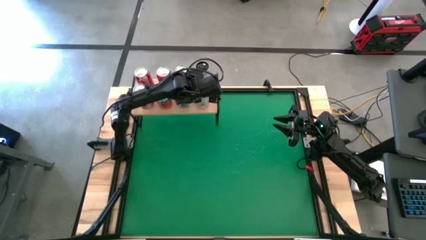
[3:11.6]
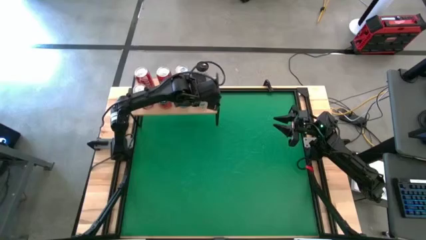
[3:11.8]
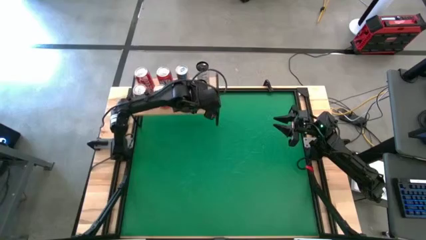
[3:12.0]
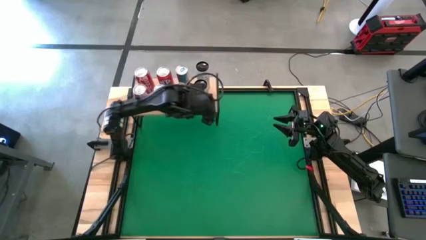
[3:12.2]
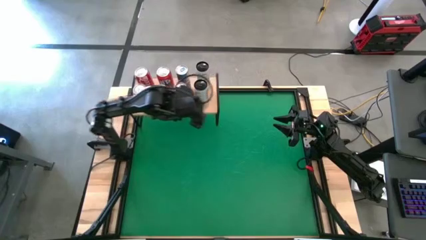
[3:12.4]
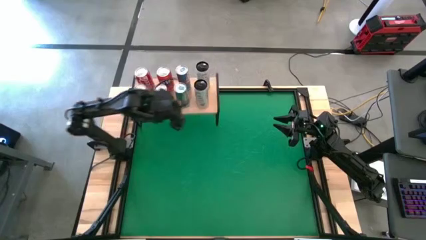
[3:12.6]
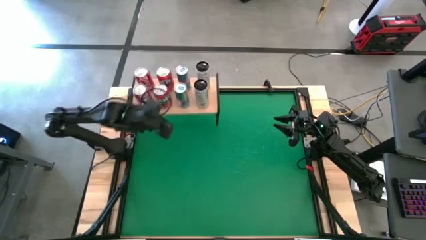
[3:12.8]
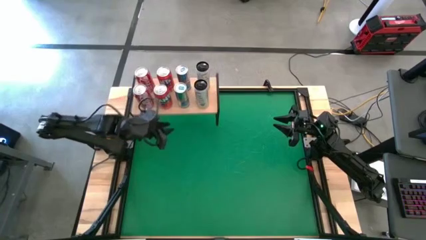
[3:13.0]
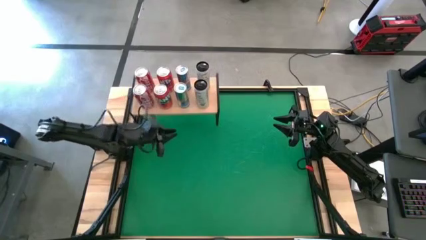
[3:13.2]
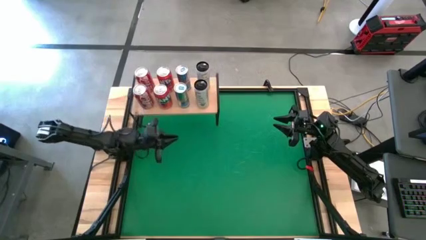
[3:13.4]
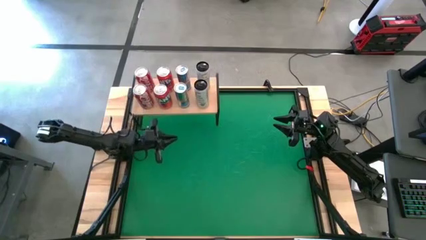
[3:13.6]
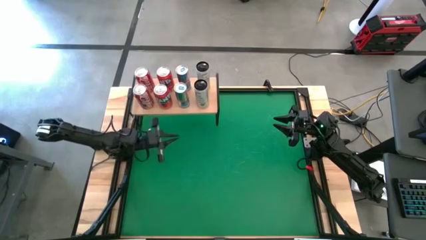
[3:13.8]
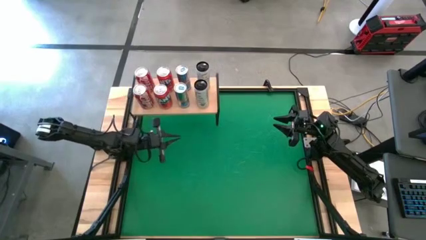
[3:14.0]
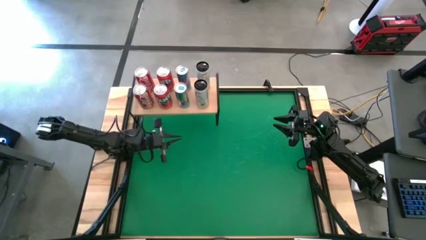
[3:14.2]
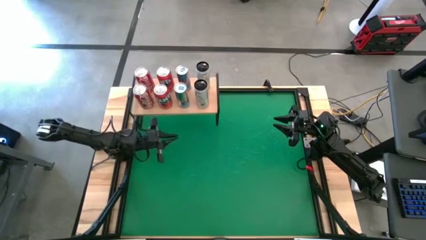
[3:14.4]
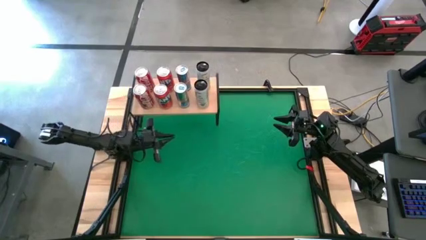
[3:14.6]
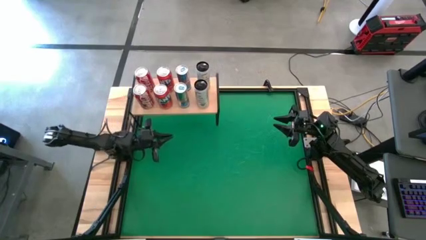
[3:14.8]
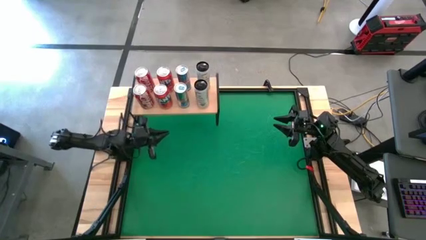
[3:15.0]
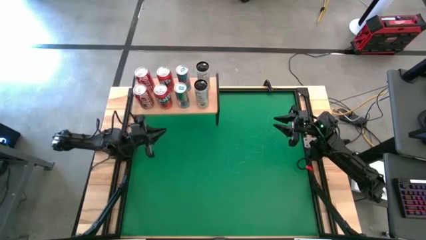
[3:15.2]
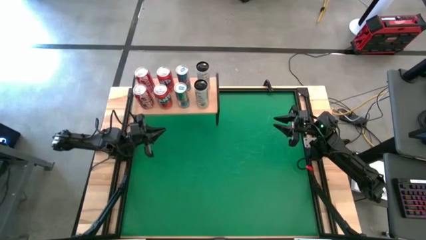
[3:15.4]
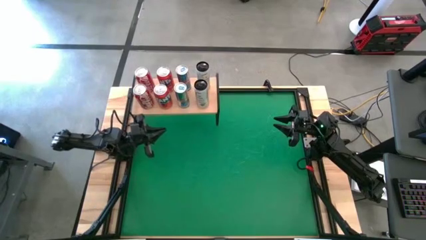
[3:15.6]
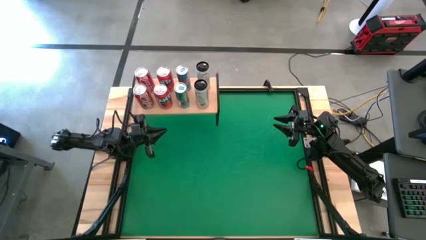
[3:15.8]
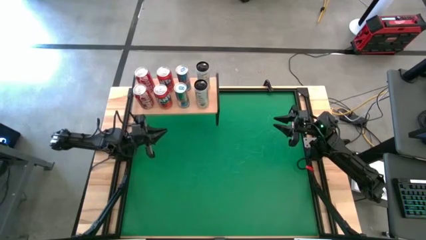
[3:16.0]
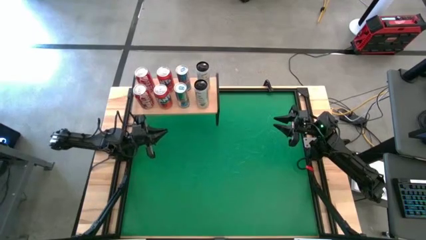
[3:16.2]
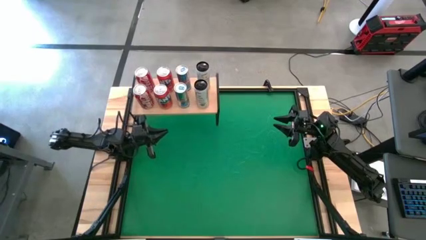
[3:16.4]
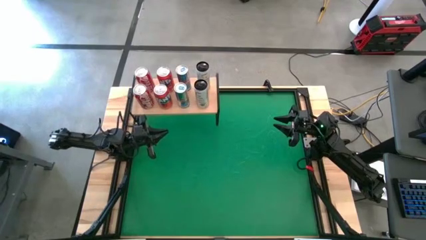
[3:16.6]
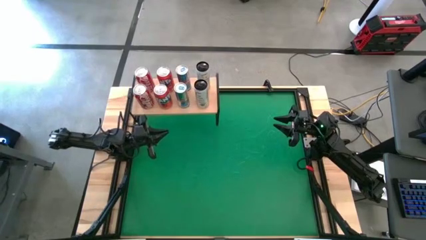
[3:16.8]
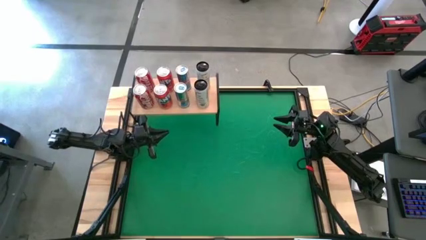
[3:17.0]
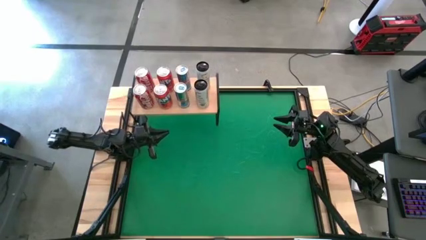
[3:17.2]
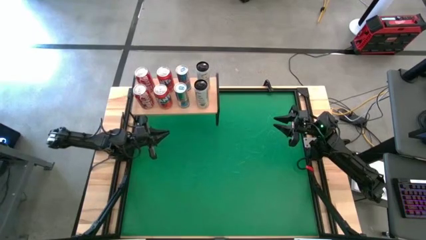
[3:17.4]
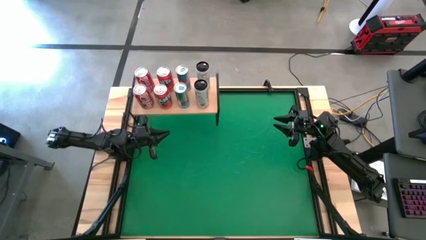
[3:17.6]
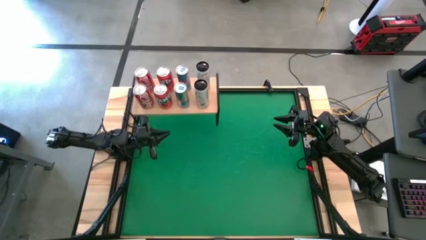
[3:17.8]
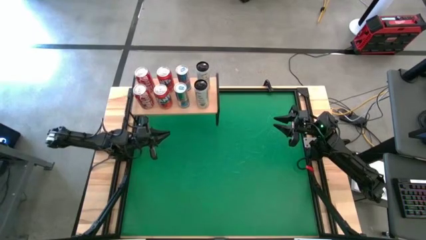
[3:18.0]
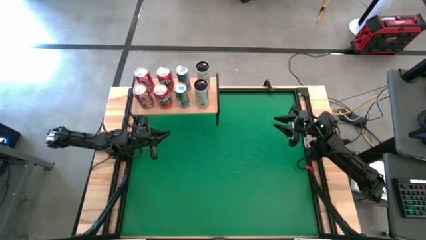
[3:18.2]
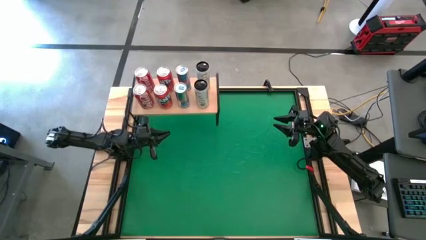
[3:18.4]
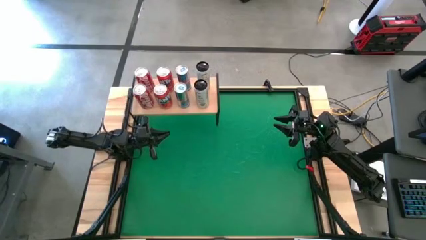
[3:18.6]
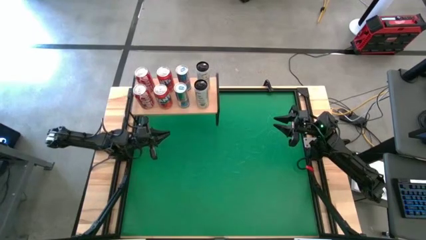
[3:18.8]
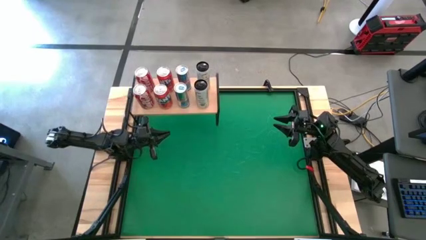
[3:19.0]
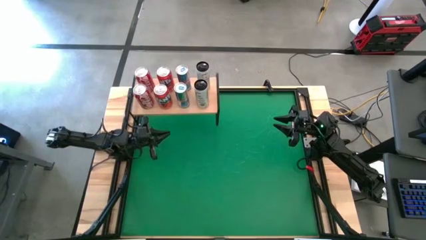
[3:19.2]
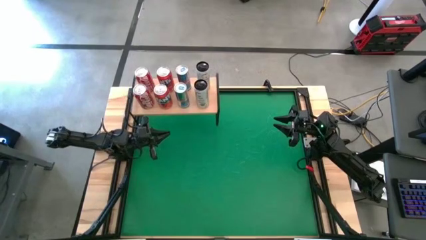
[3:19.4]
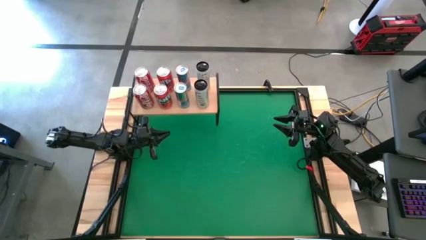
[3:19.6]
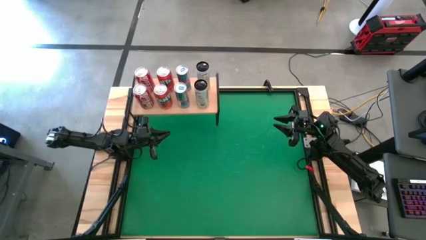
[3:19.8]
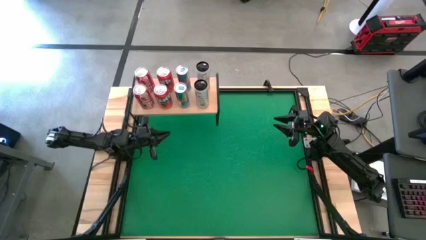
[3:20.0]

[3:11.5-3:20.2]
Task: Place canned beverage on shelf
Return to Home Position

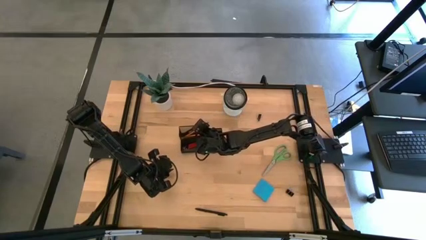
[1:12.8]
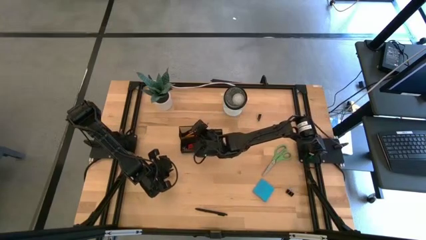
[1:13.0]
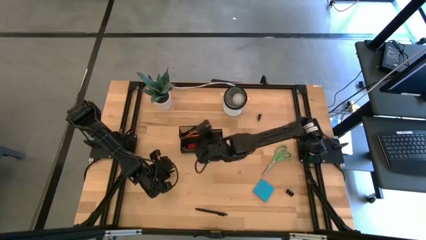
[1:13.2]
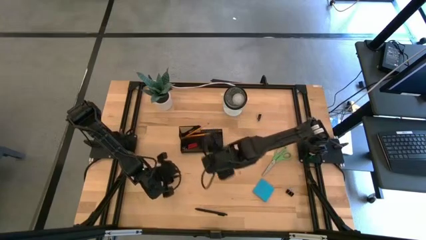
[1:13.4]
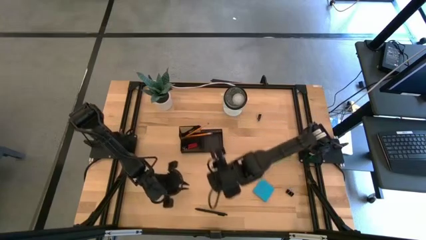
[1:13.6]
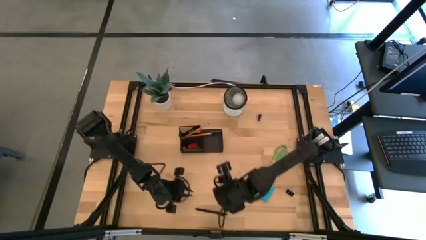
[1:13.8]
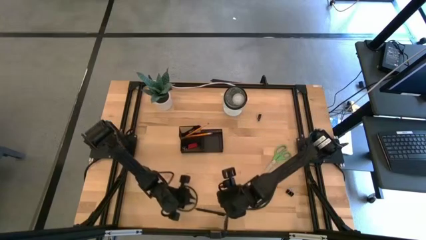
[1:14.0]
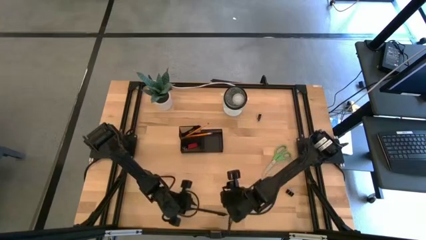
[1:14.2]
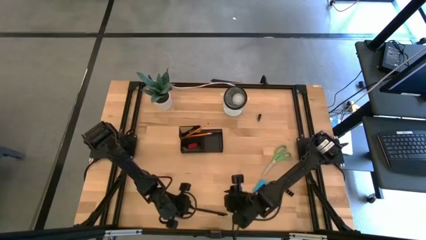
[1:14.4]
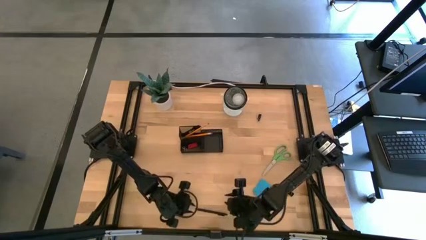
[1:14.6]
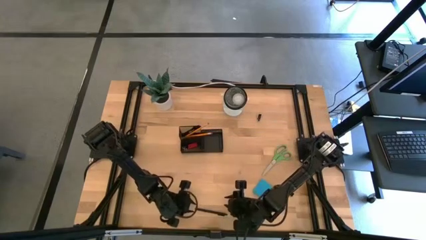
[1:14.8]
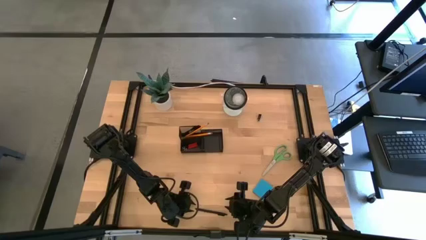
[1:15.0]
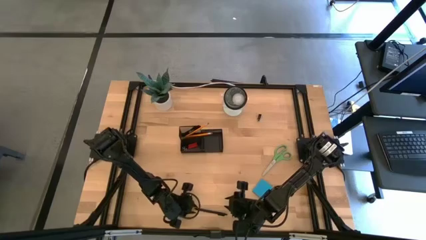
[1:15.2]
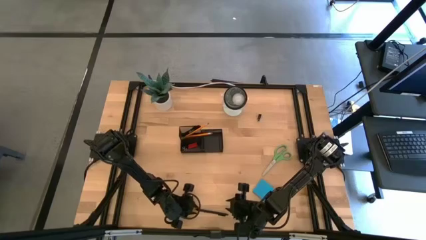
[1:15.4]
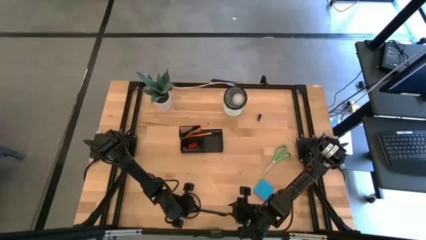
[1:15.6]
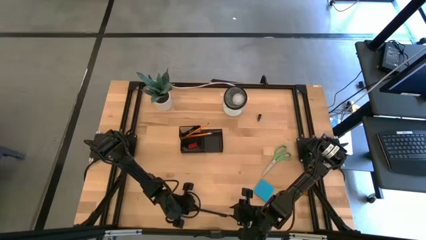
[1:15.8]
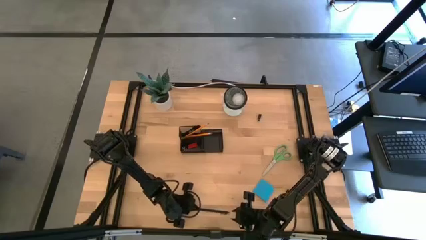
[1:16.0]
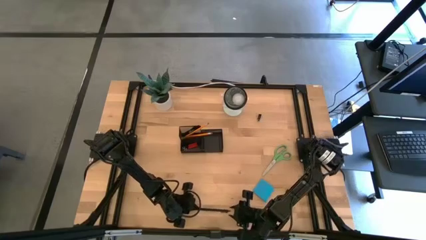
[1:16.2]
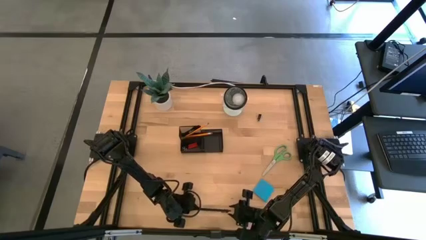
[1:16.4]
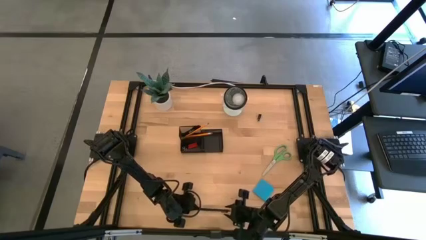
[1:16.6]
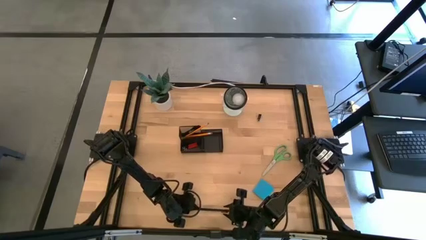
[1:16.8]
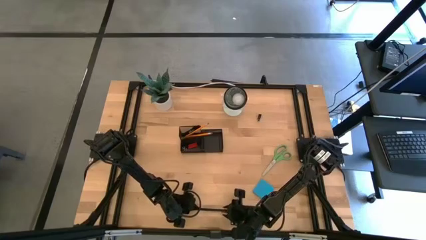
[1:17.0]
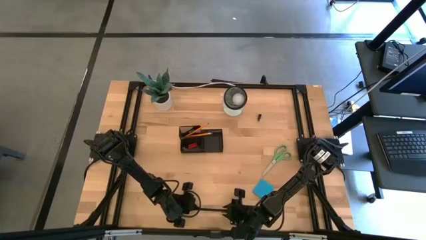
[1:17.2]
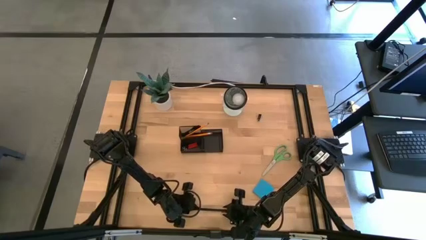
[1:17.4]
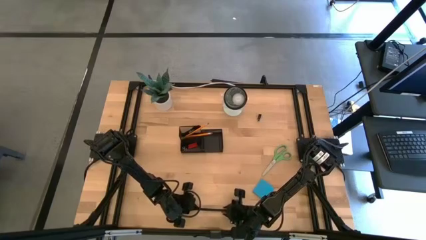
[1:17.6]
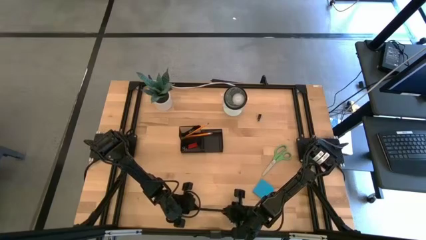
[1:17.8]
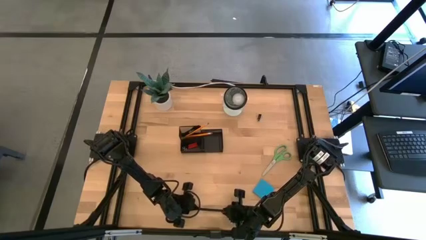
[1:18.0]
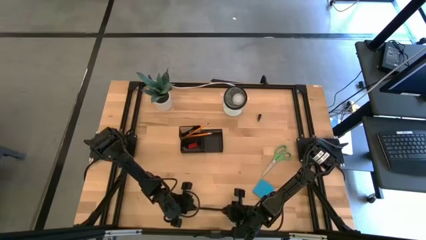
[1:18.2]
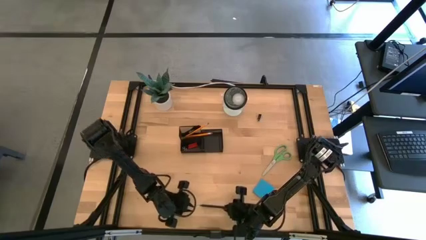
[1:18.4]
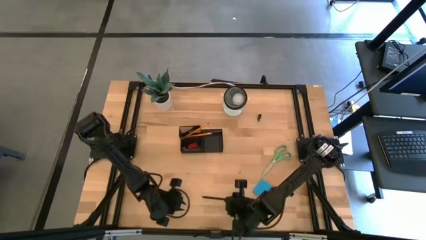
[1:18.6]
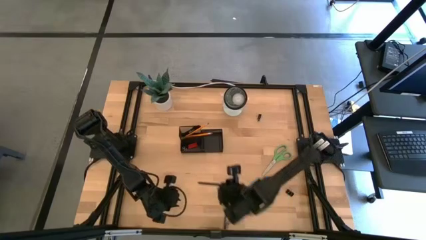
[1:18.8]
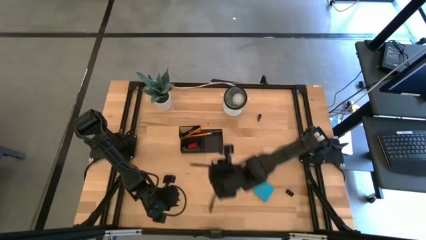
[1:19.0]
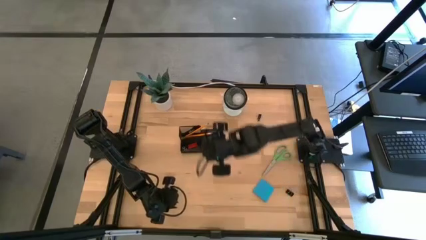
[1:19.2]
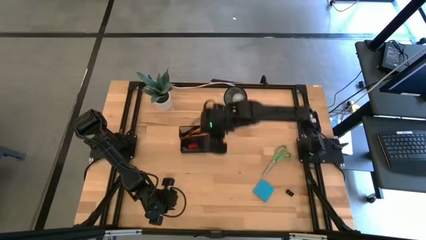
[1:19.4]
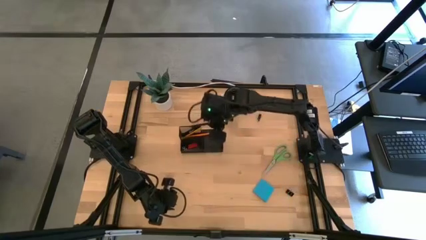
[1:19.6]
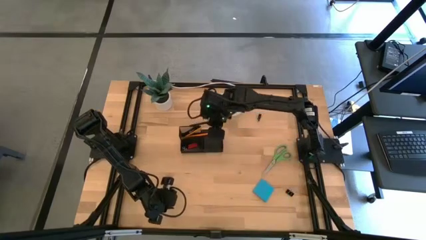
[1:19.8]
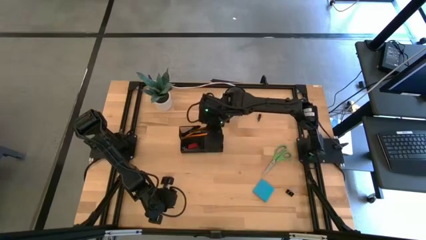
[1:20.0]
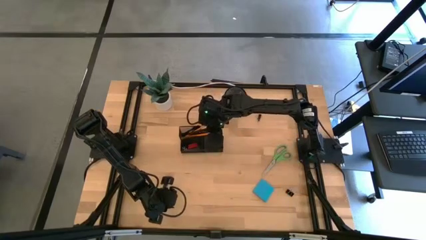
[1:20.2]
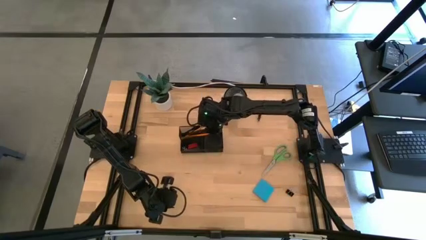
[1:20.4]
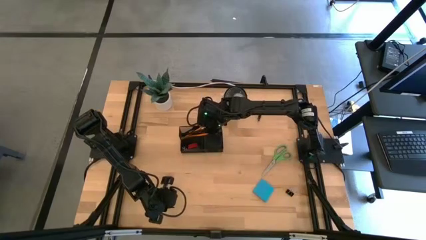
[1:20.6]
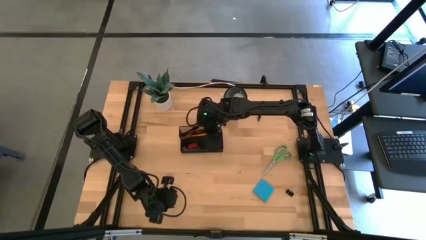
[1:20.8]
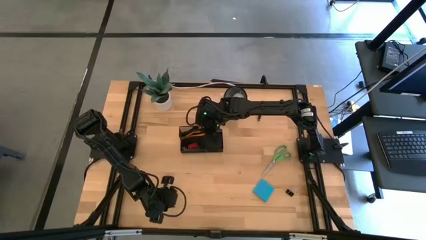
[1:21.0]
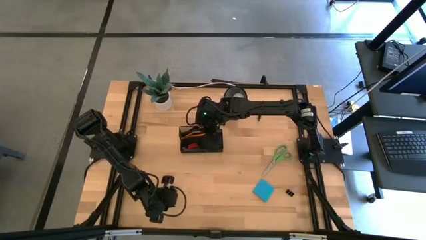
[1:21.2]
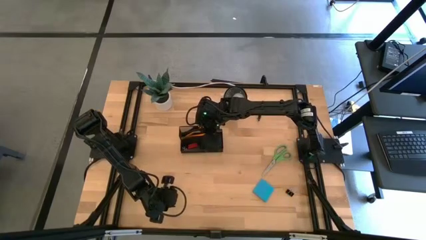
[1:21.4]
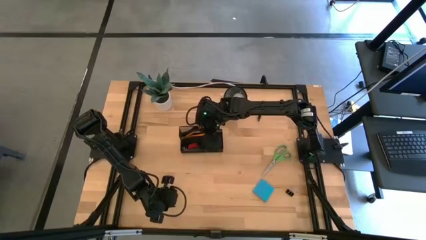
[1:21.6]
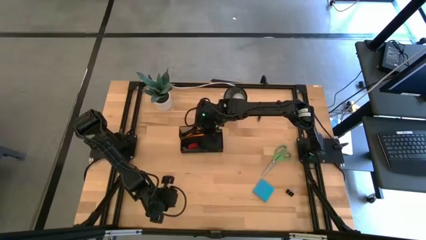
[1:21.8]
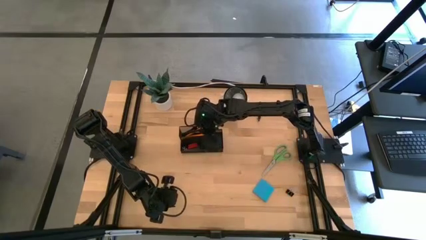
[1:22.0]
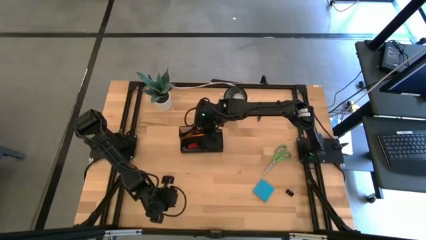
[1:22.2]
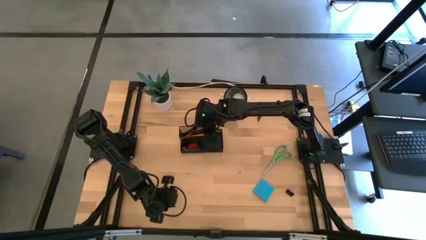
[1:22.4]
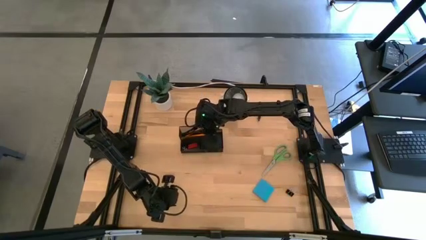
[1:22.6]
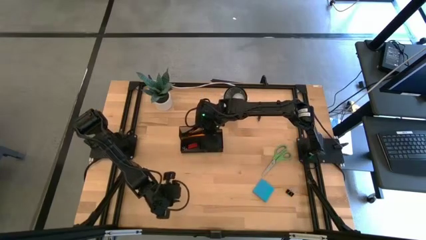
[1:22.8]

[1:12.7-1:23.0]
Task: Pick and place office supplies into organizer
Put the black pen in the desk organizer
